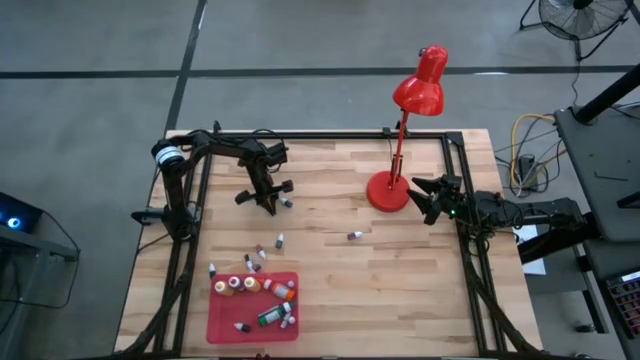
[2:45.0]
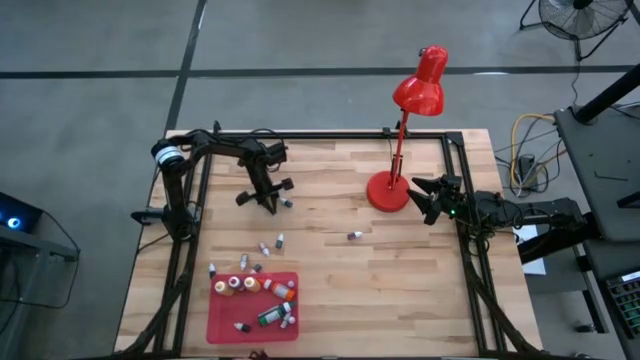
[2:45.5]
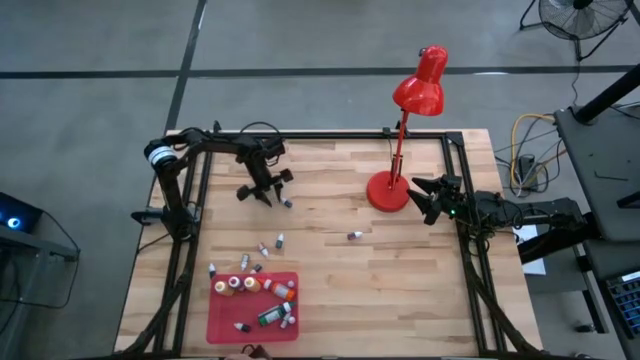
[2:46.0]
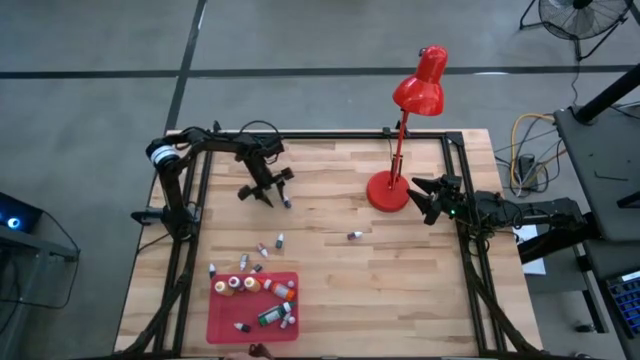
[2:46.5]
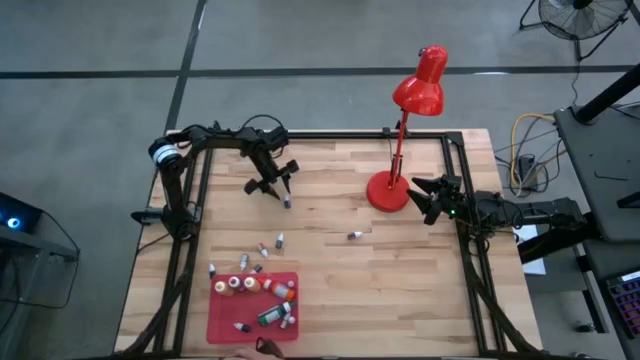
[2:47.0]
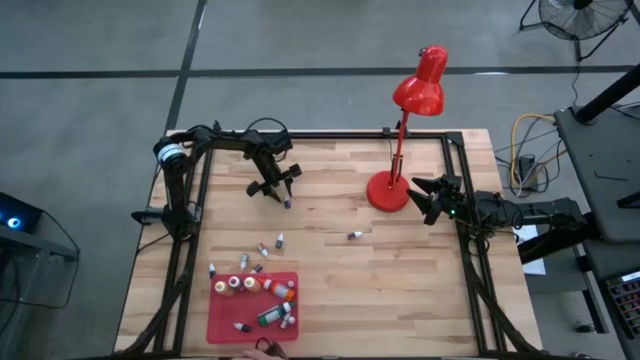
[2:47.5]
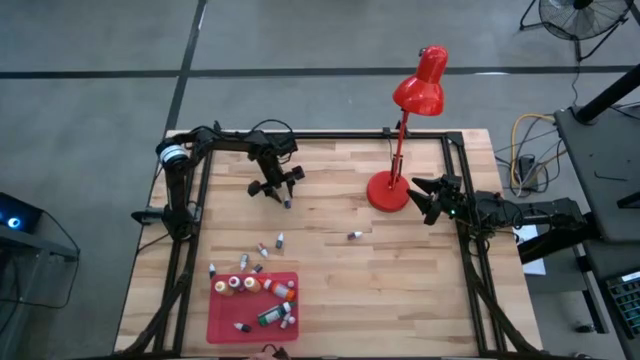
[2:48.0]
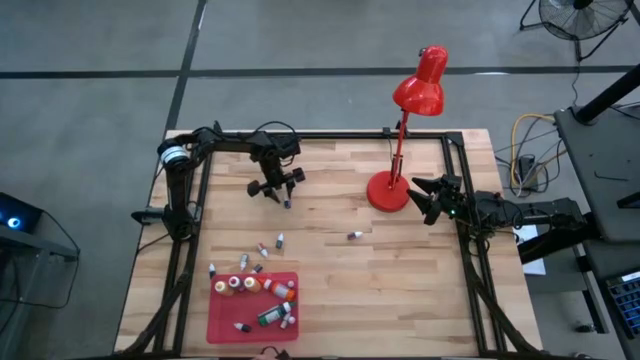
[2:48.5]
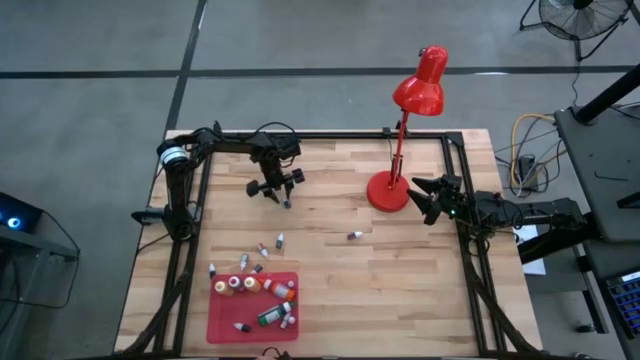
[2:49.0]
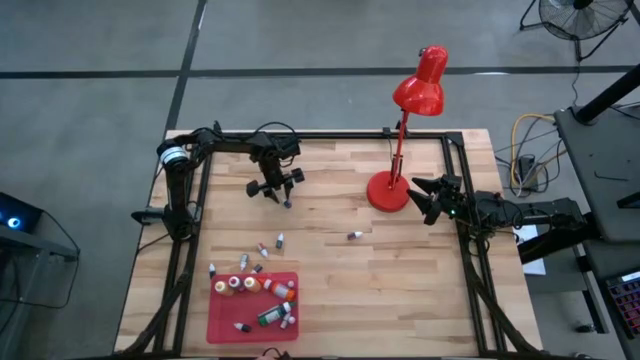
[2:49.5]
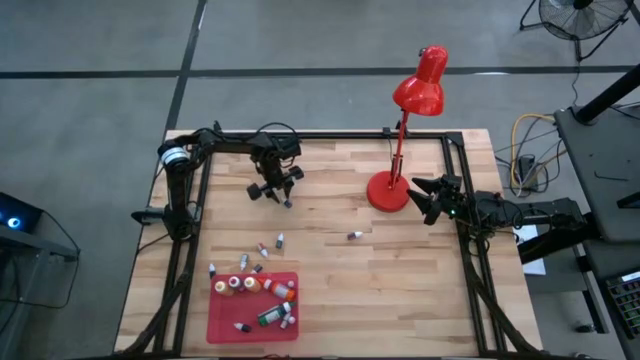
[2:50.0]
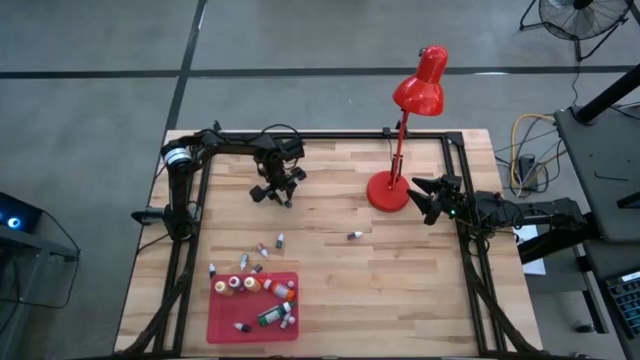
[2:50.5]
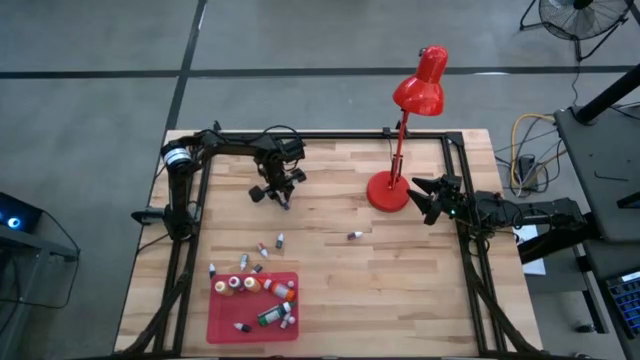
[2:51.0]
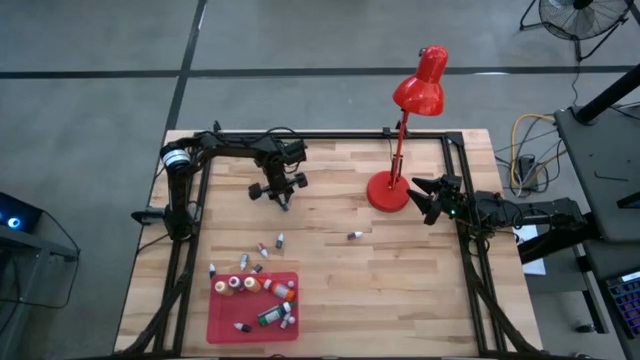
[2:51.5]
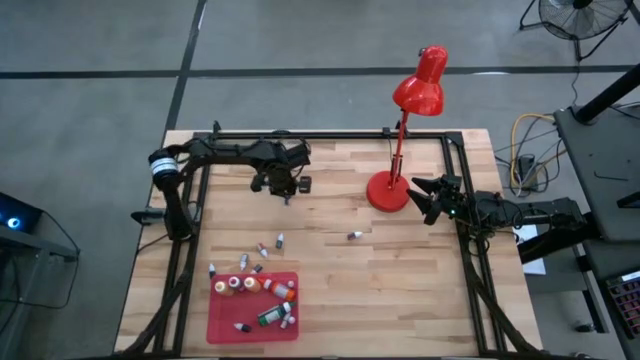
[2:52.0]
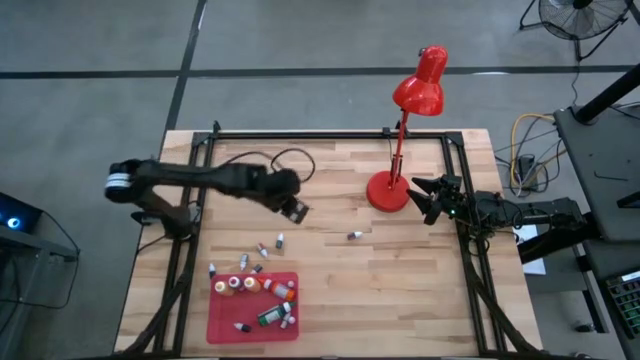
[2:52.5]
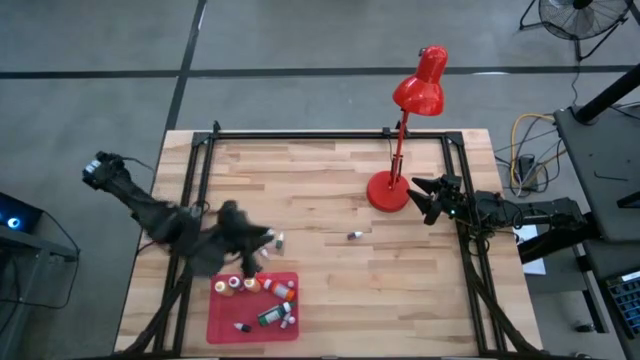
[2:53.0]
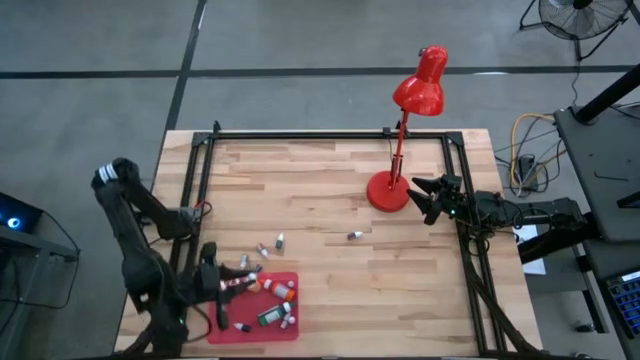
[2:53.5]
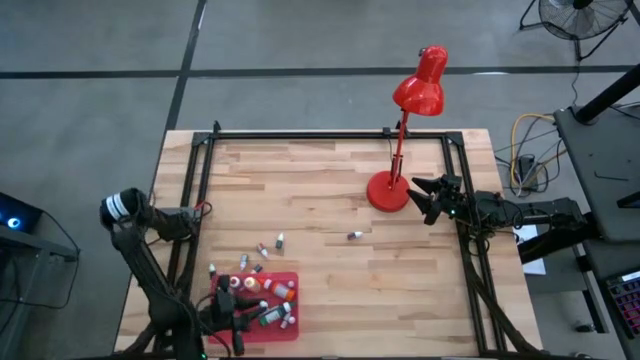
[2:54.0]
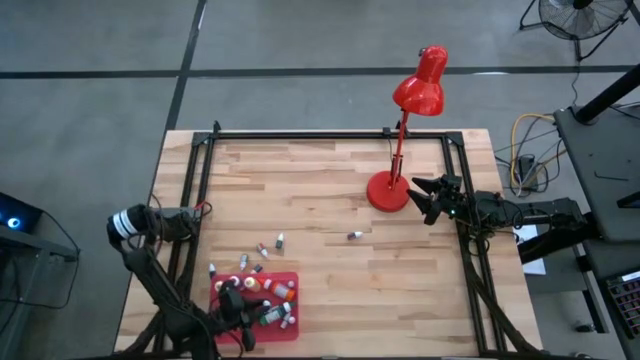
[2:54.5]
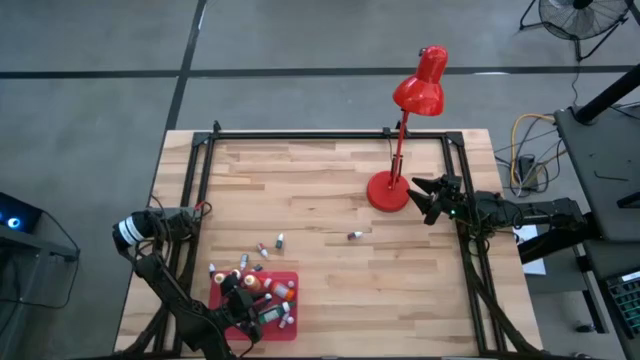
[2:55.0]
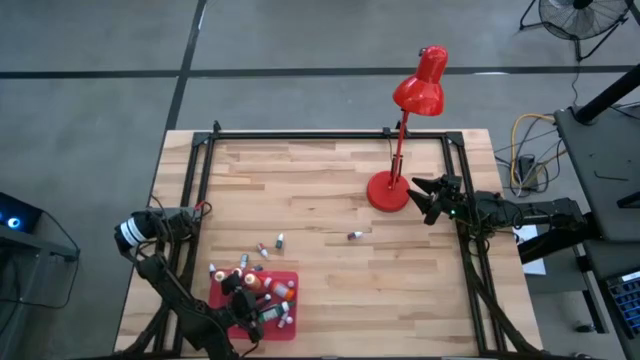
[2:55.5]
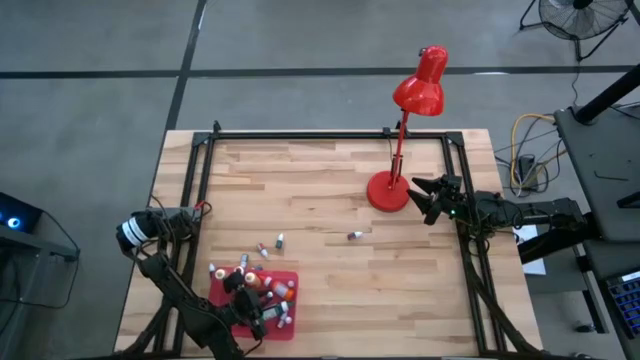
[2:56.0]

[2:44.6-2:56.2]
Task: Pick & Place food coloring
Put the small blue food coloring bottle into the red bin

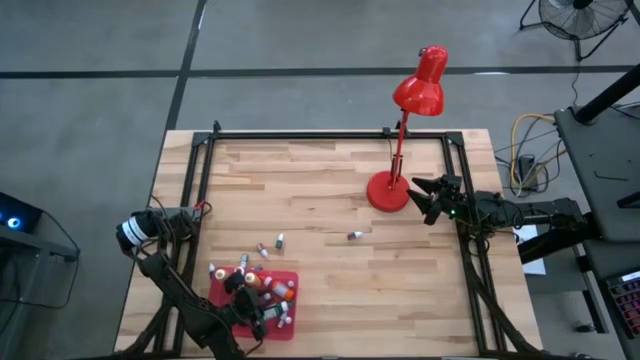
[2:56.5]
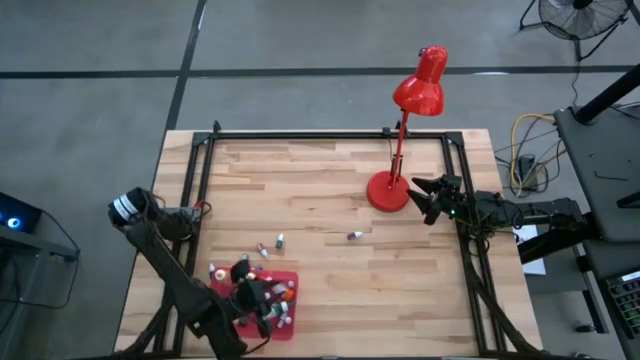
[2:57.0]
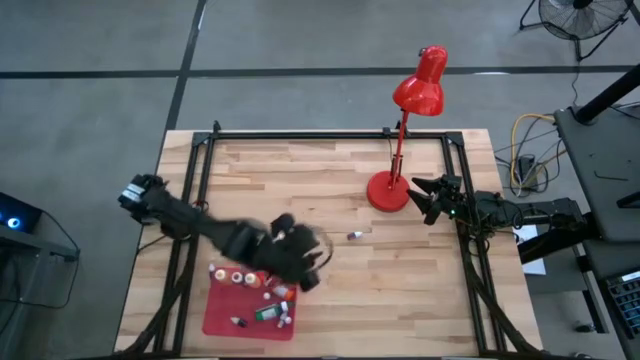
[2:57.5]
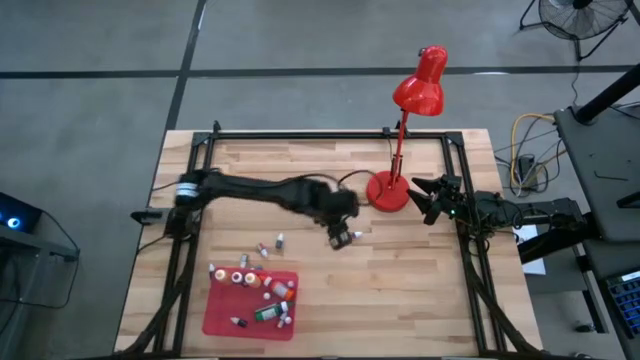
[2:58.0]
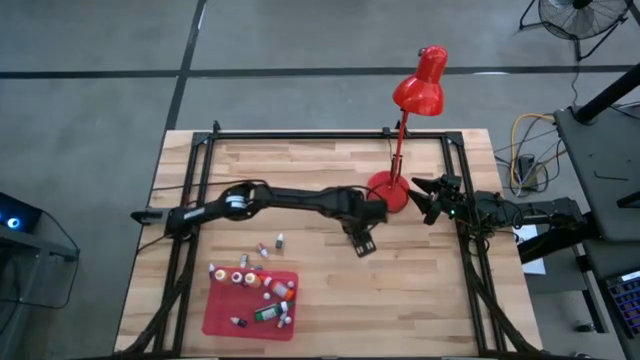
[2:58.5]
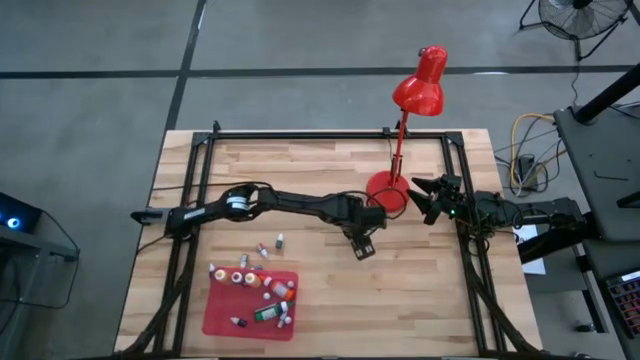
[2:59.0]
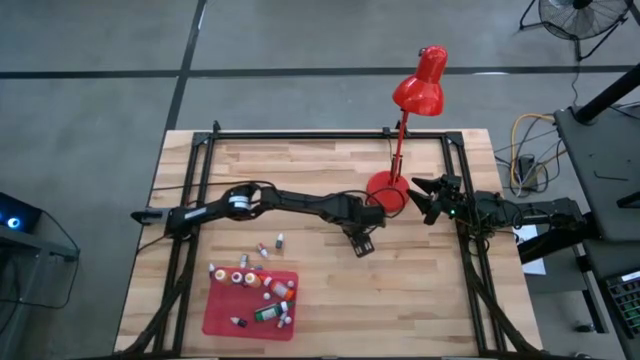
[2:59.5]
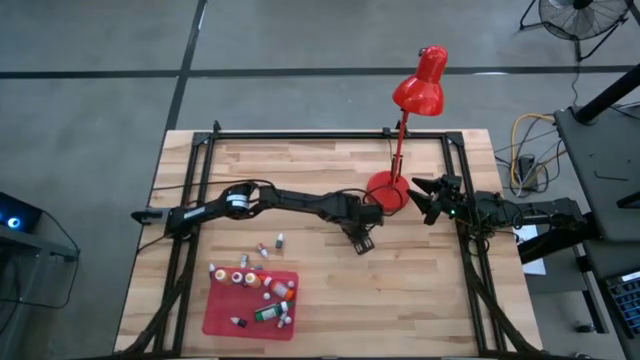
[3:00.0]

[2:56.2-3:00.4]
Put the small pink food coloring bottle into the red bin

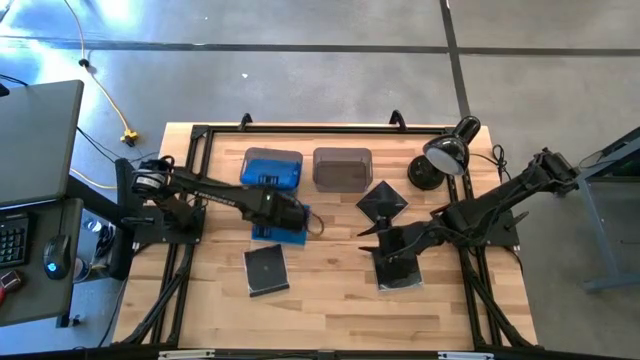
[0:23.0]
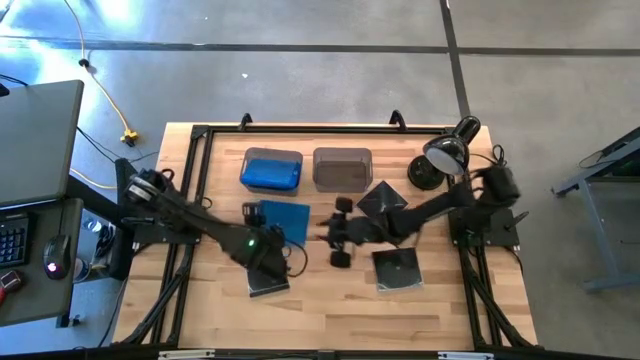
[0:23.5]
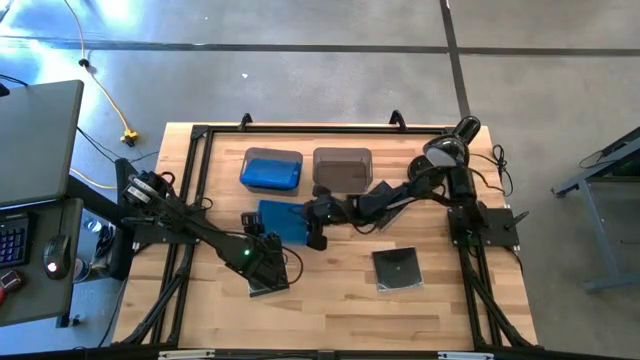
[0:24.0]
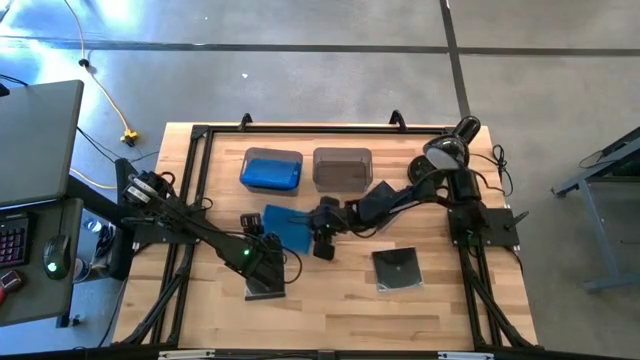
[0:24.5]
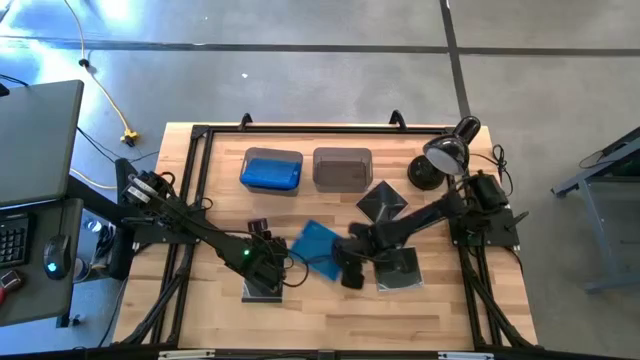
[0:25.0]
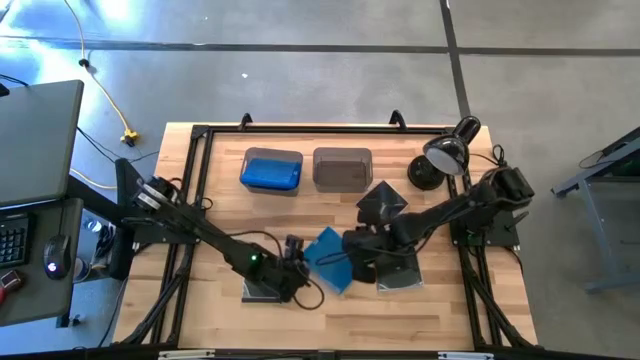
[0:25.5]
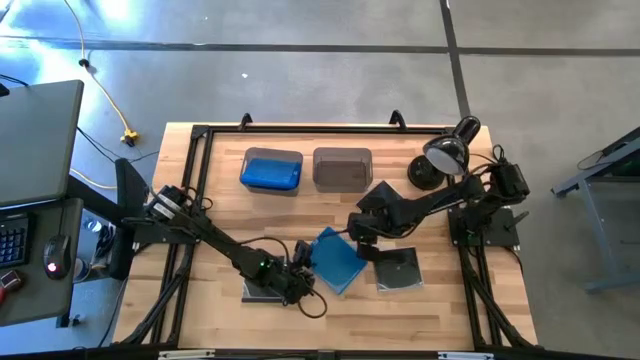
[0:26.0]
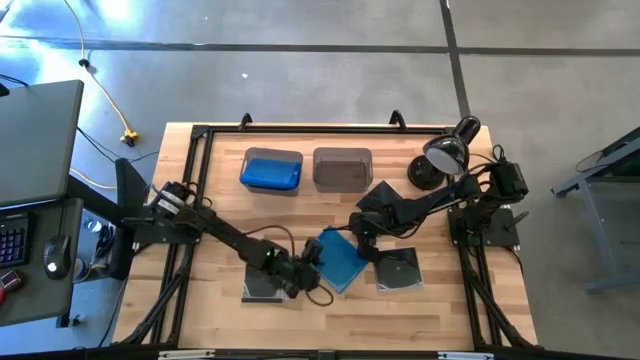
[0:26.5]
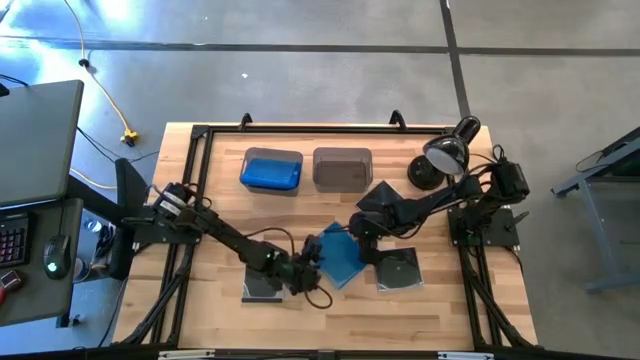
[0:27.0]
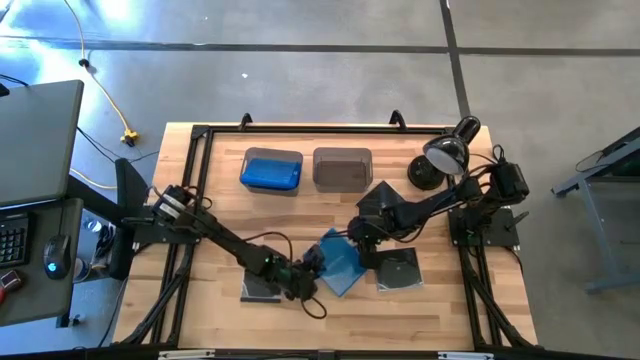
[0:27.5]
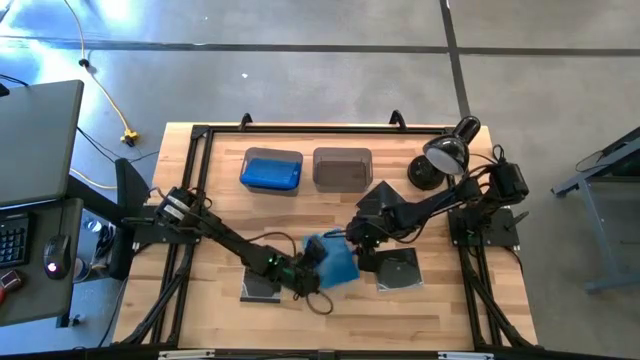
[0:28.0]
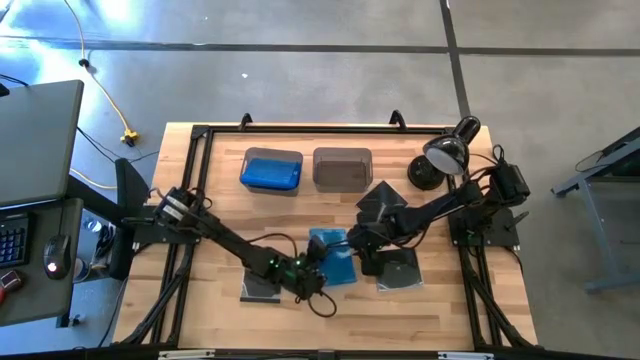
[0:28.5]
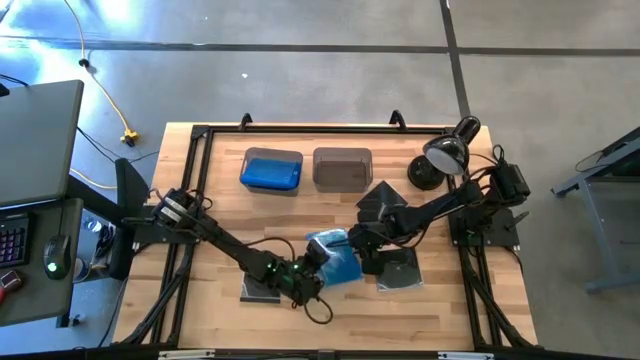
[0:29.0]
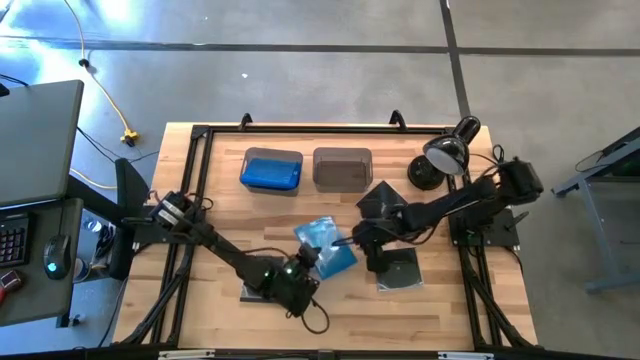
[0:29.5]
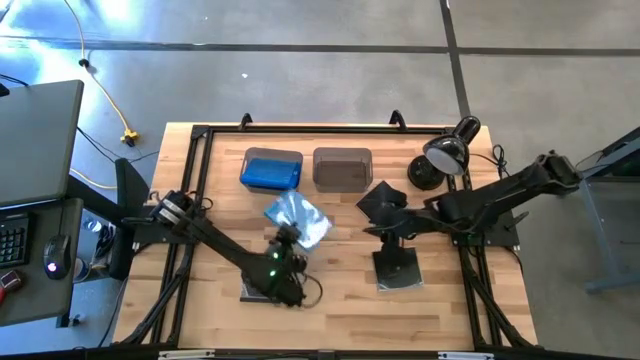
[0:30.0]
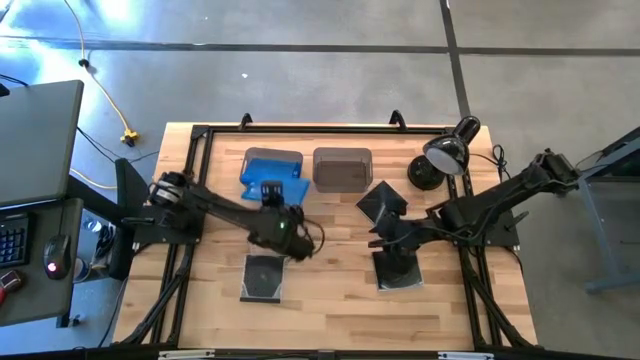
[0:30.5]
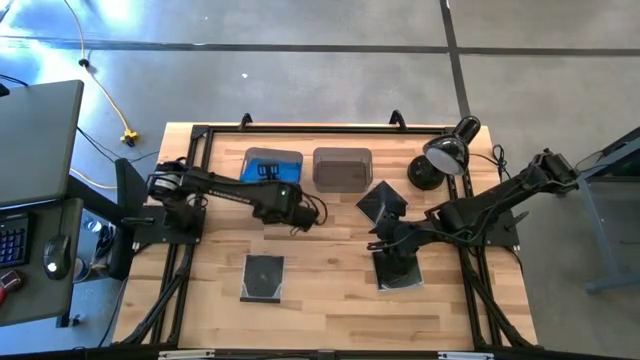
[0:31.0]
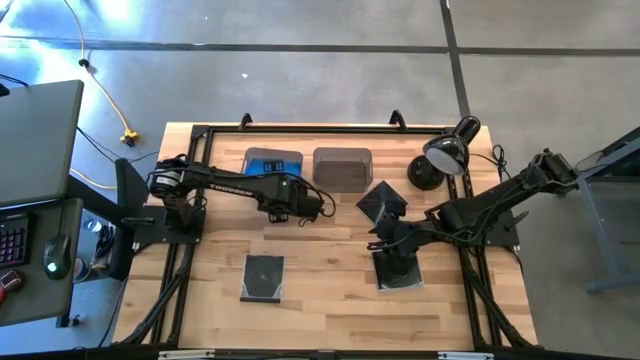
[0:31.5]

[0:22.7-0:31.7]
Task: Pick & place jewel cases by type
Put the blue CD case into the left black bin
